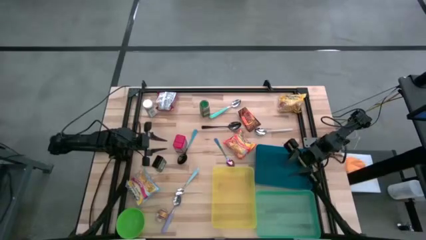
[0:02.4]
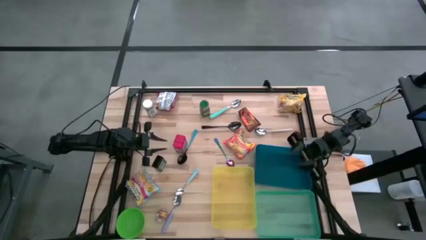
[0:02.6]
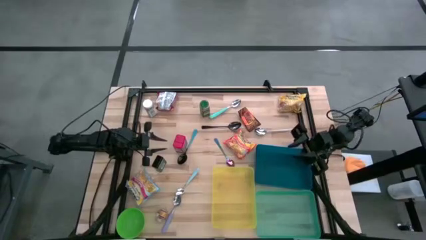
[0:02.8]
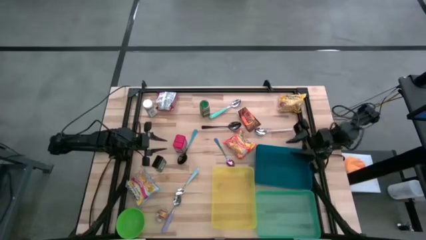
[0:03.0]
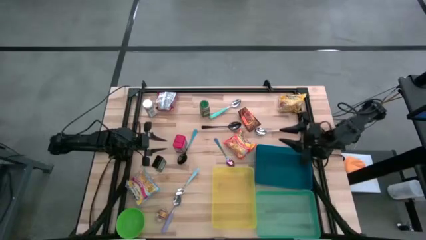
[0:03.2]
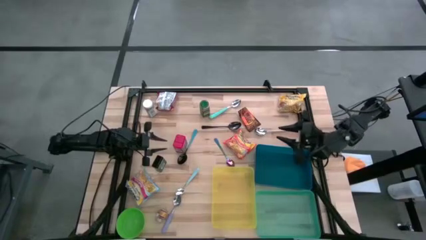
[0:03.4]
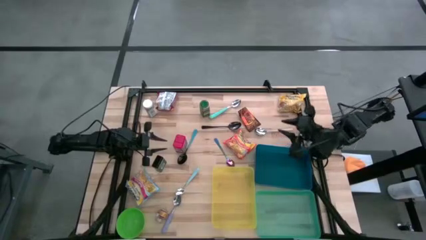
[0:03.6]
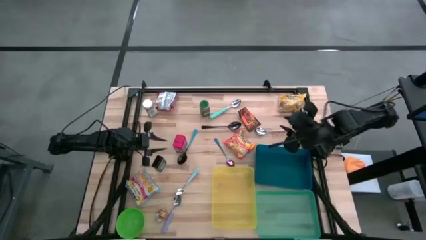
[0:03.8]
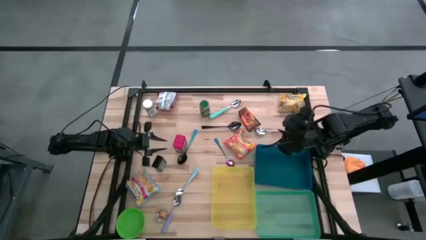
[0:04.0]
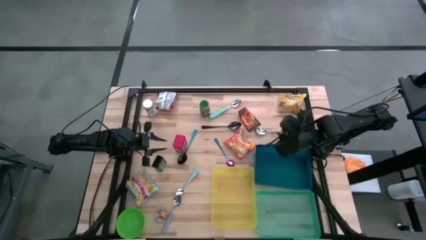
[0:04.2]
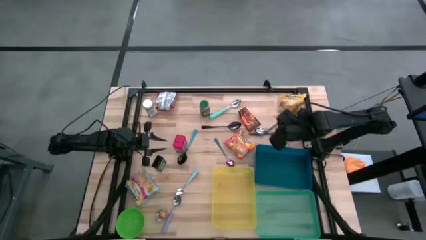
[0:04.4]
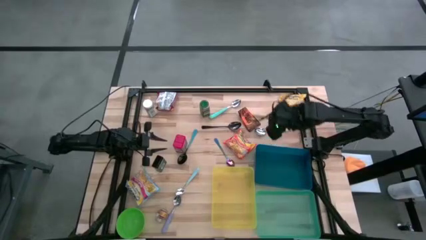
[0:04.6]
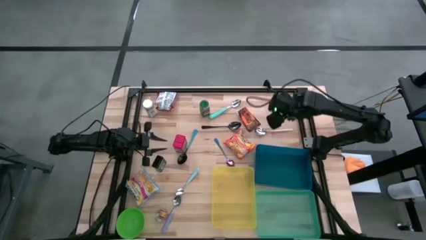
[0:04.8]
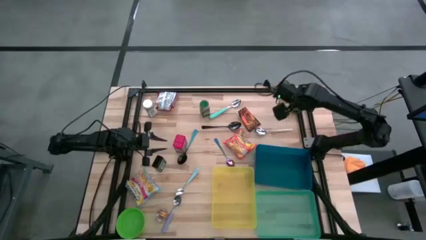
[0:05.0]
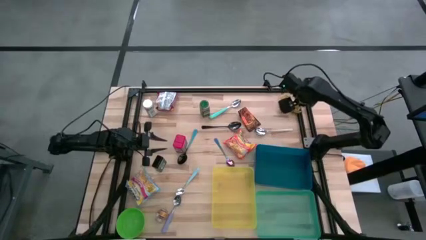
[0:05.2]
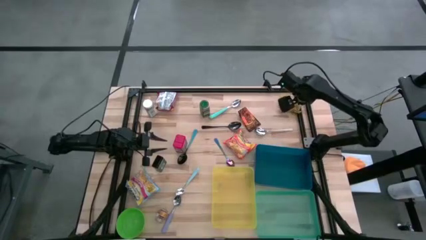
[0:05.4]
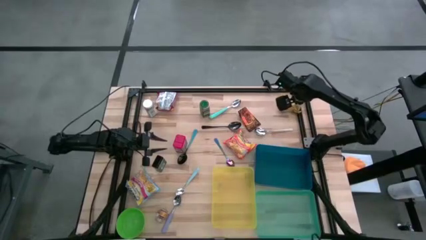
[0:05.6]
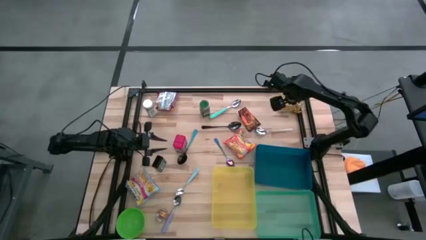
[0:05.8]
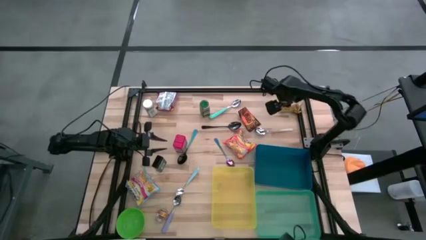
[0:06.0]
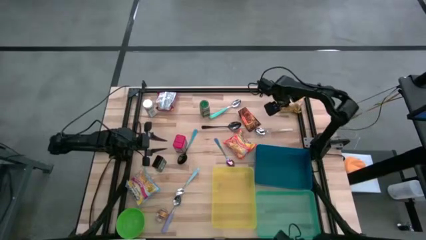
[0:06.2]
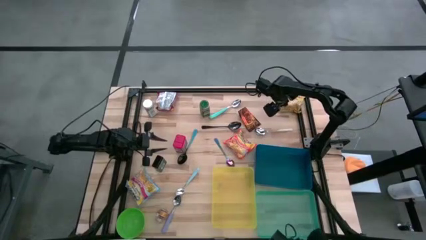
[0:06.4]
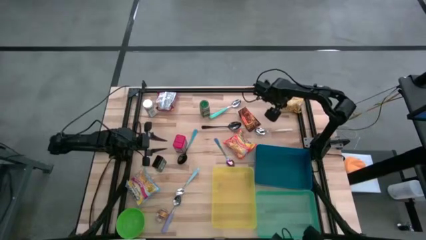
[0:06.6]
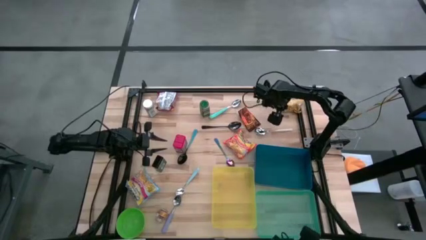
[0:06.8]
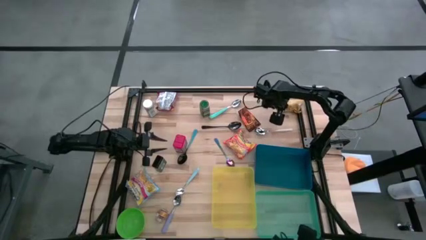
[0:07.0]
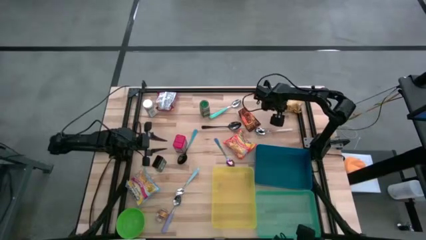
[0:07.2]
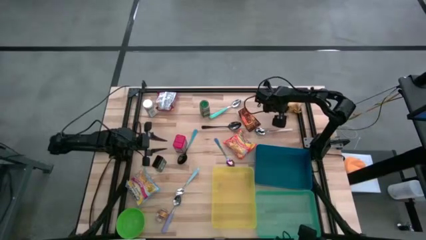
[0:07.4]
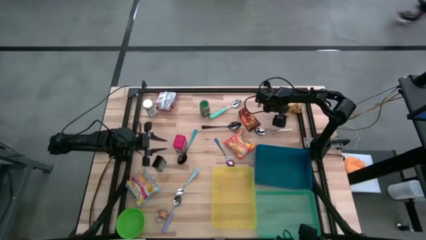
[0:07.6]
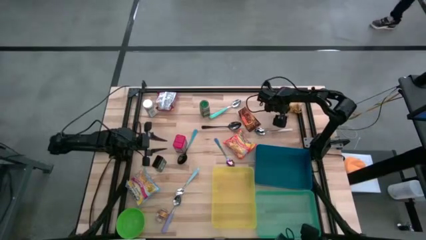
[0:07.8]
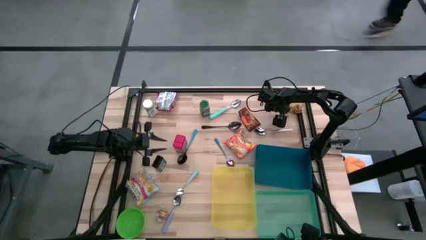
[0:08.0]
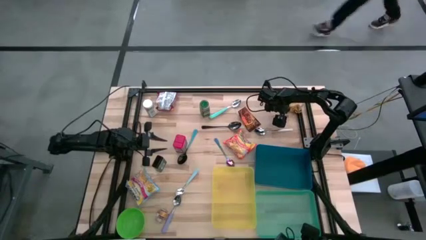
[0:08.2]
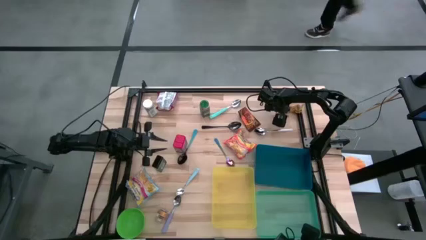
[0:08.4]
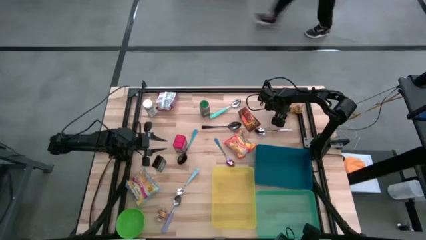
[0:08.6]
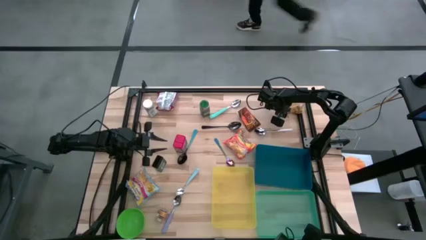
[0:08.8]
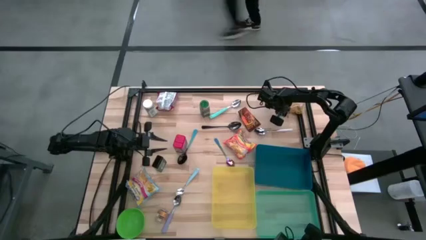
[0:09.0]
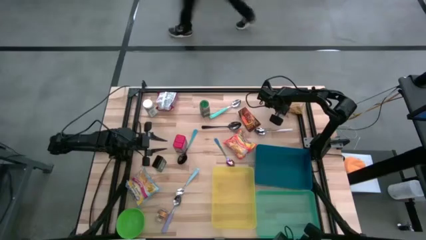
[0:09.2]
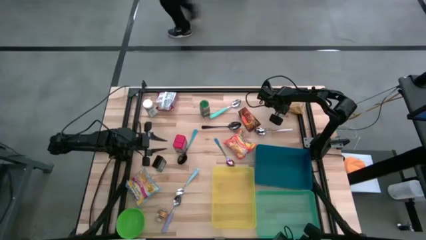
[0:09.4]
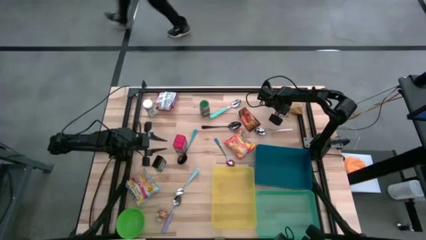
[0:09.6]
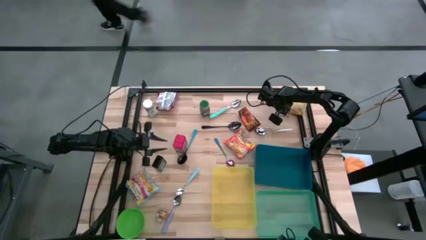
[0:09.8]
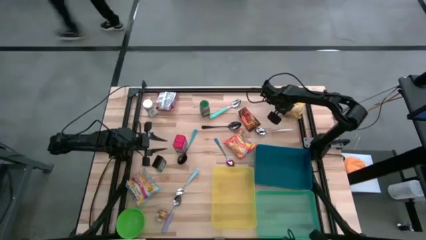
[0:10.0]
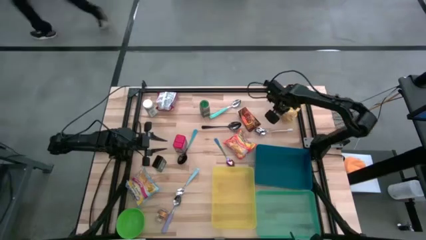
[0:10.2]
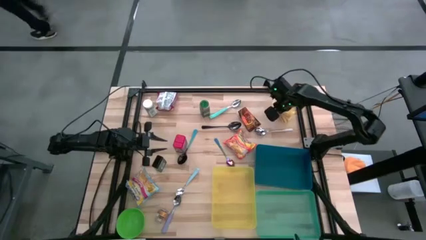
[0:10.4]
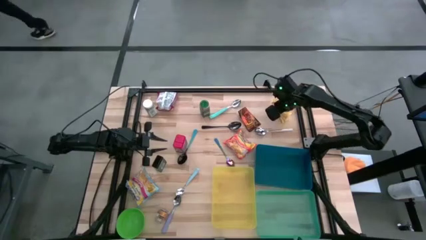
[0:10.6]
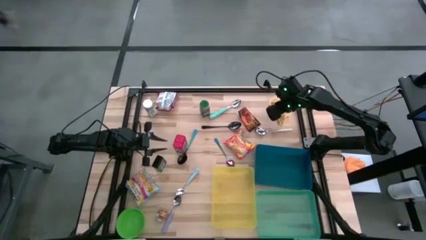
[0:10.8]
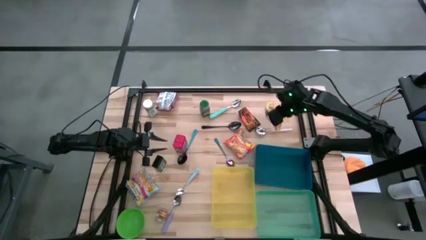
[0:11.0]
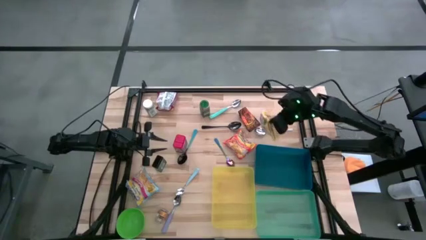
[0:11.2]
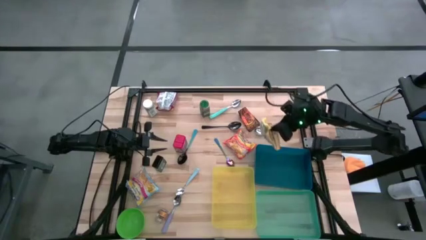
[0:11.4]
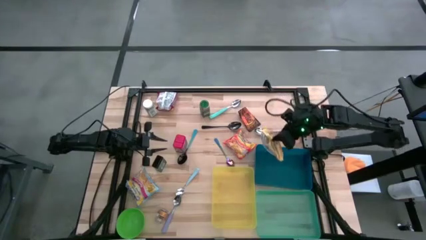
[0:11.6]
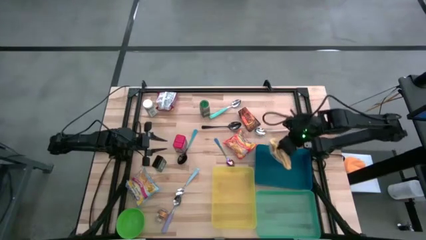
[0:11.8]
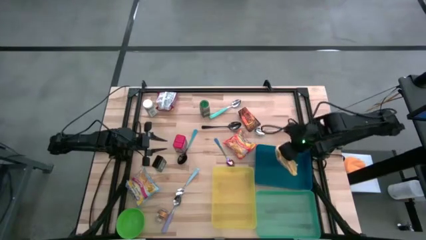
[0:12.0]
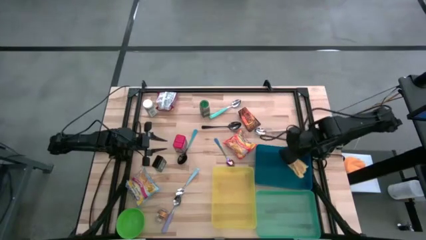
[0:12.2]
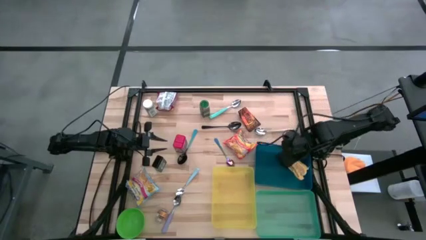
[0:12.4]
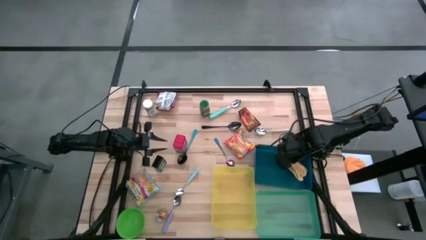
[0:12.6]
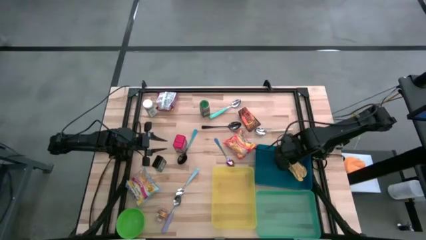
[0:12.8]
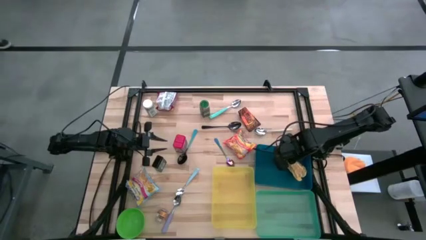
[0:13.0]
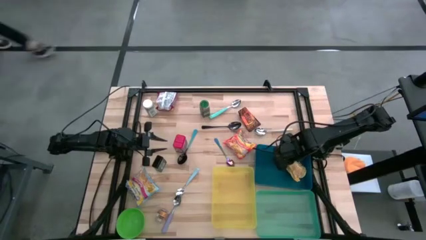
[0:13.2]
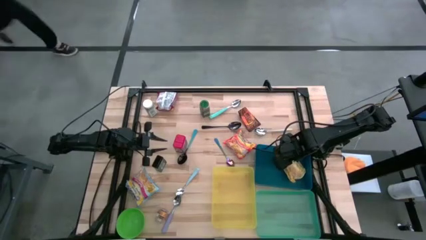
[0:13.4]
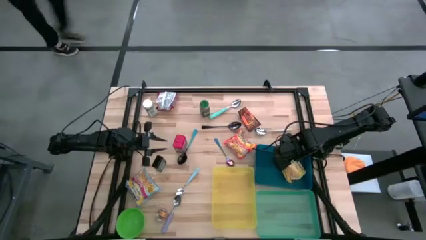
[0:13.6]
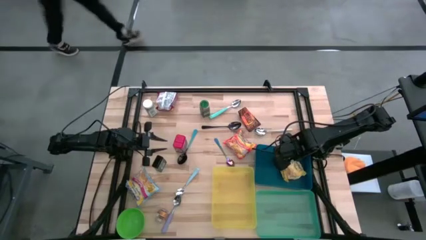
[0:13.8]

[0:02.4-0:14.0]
Put the yellow noodle pack into the blue bin

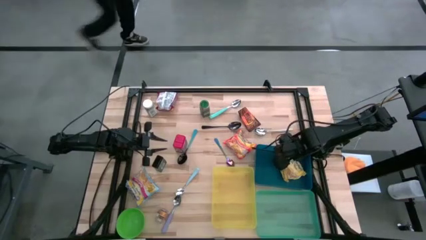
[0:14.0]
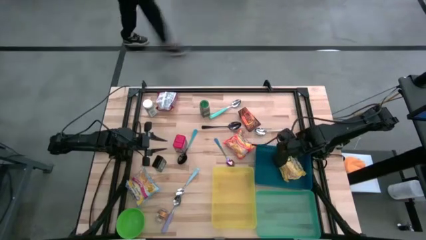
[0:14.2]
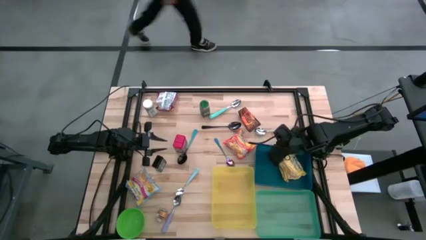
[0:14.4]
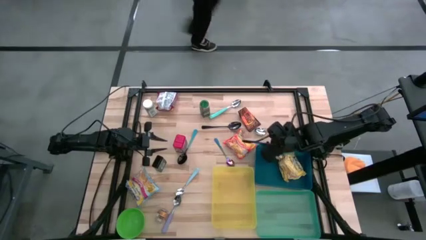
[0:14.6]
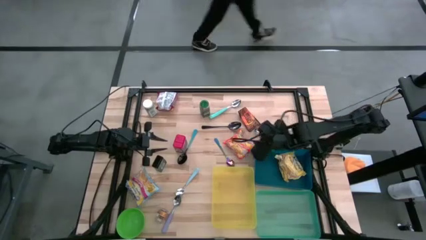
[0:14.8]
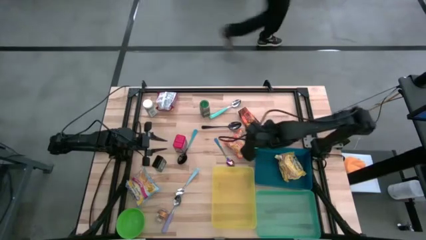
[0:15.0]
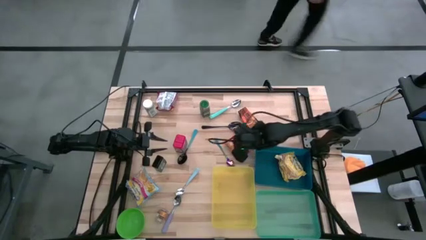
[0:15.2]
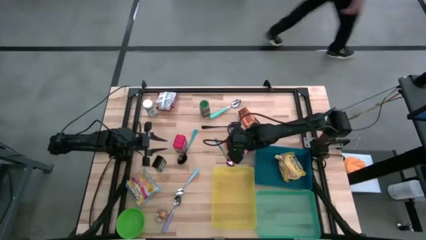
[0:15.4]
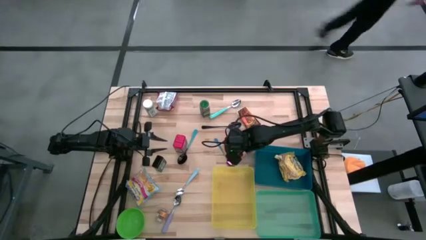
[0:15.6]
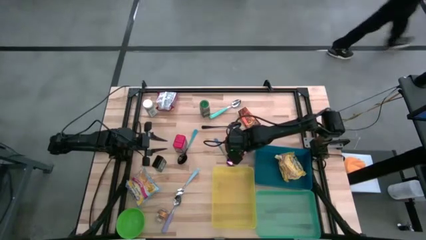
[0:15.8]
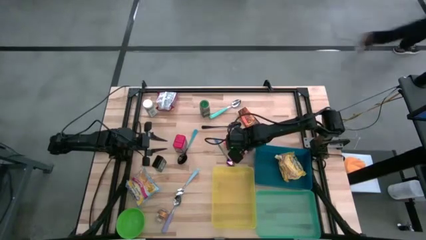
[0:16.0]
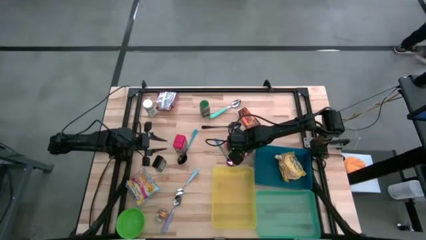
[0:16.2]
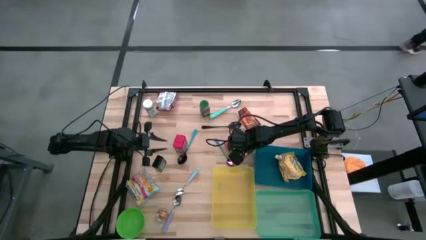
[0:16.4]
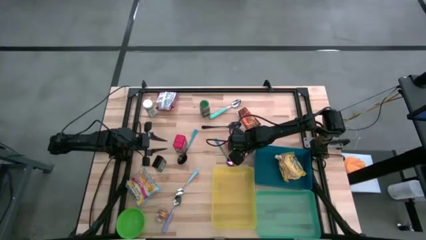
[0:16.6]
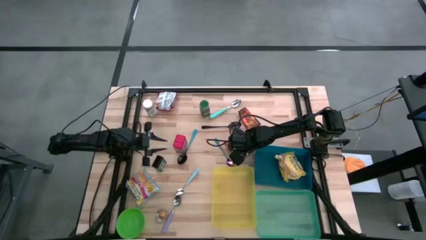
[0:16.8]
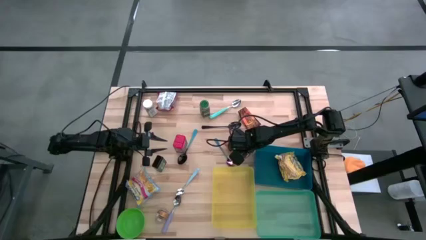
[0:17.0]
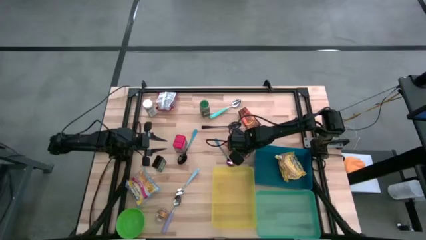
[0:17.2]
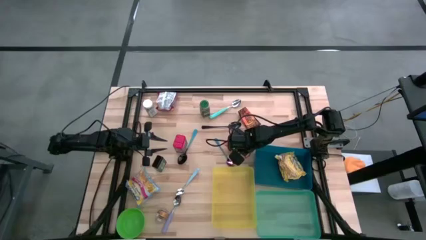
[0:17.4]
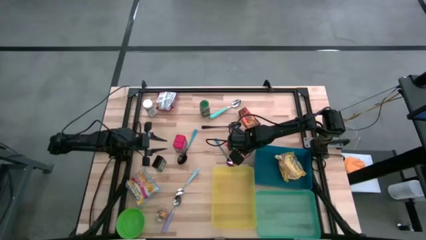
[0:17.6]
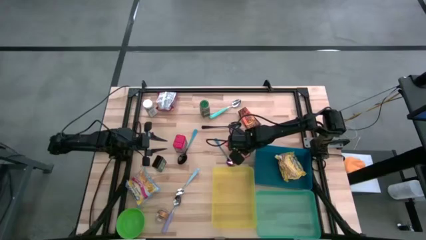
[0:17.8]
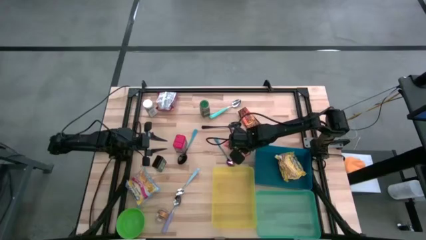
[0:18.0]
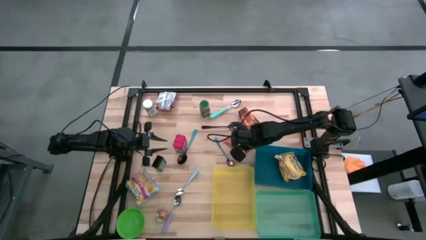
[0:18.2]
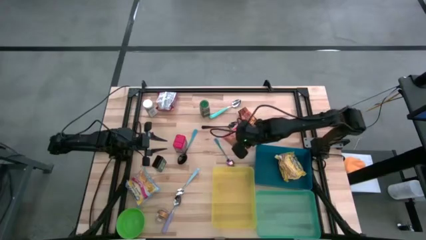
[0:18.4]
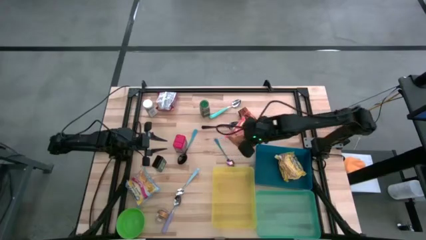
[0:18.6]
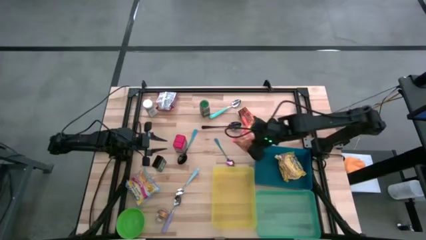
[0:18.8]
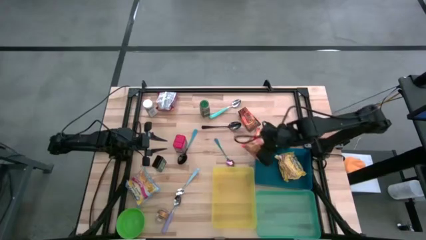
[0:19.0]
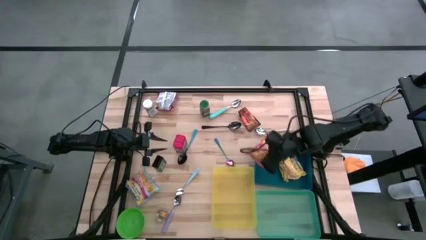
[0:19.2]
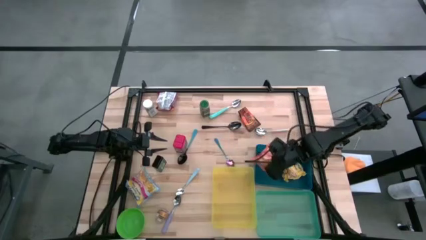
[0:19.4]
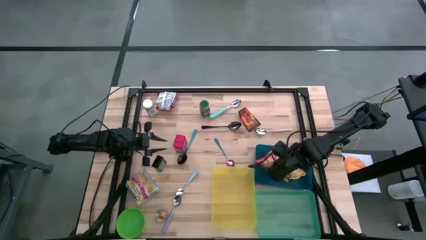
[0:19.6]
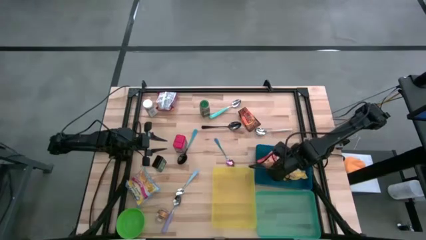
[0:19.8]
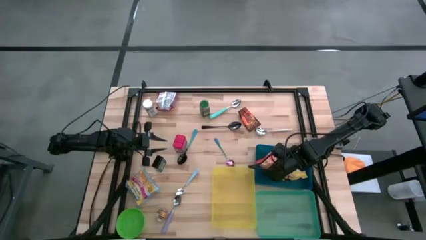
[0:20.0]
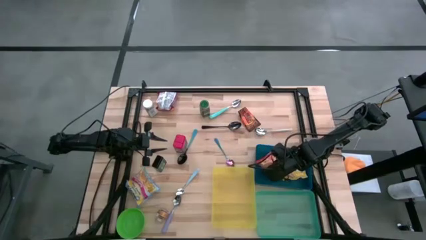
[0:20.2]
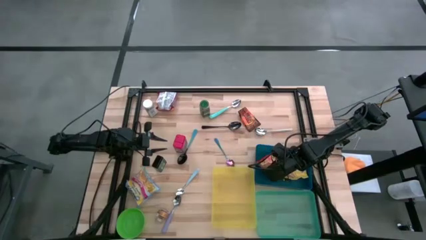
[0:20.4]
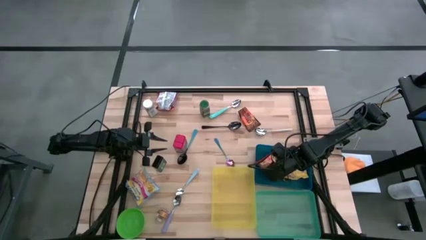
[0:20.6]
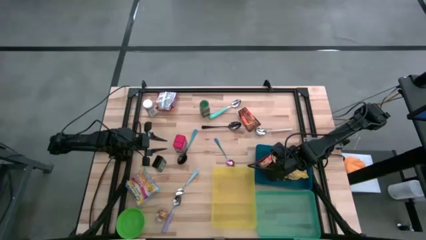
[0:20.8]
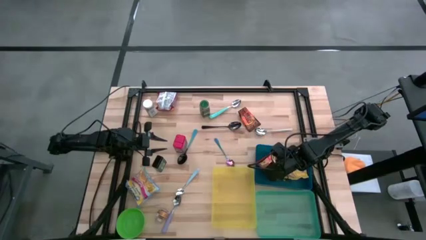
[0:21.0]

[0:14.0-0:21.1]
Put the orange noodle pack into the blue bin
